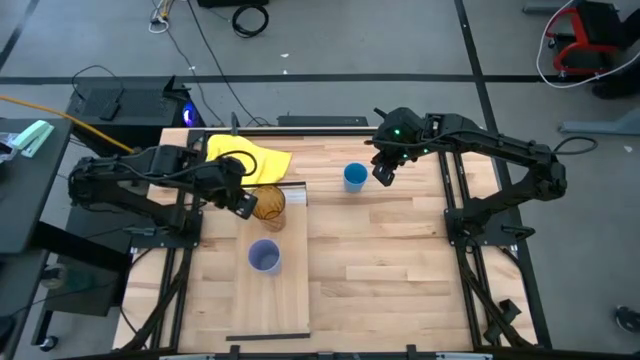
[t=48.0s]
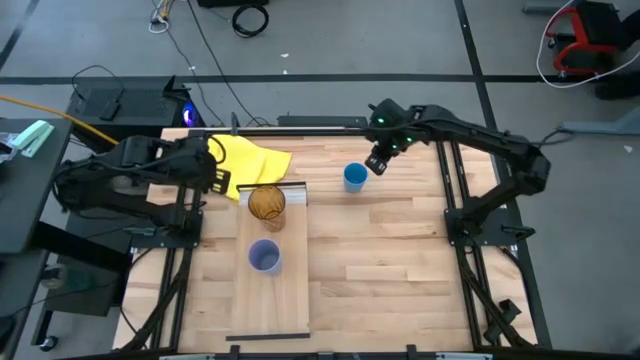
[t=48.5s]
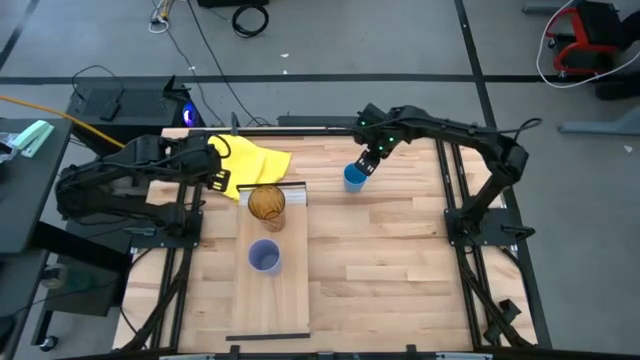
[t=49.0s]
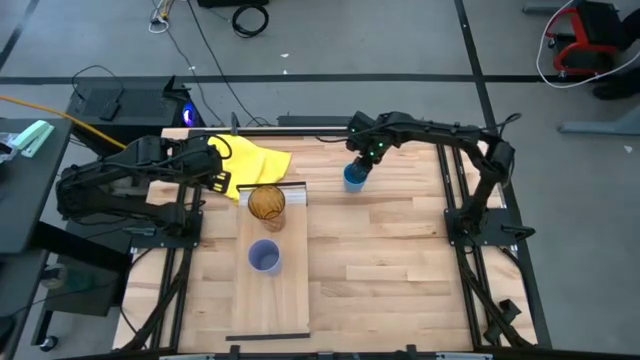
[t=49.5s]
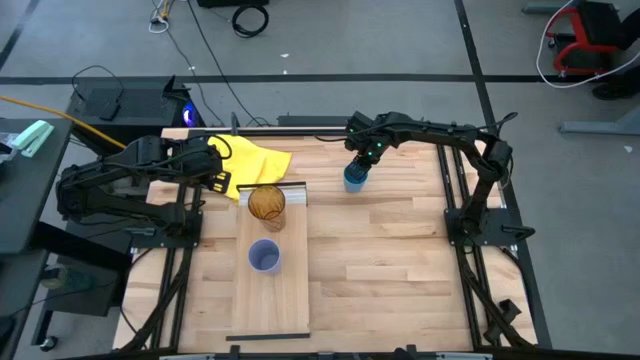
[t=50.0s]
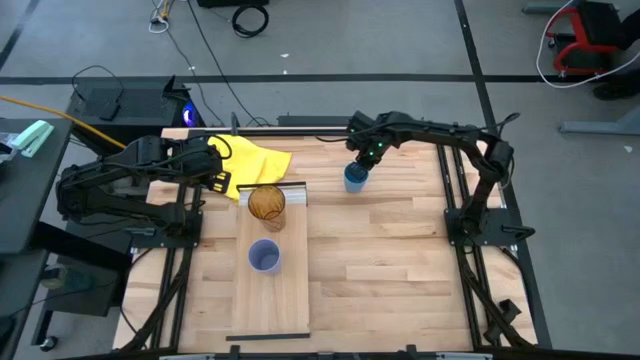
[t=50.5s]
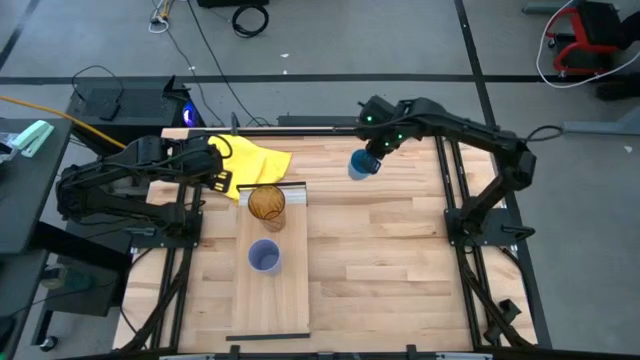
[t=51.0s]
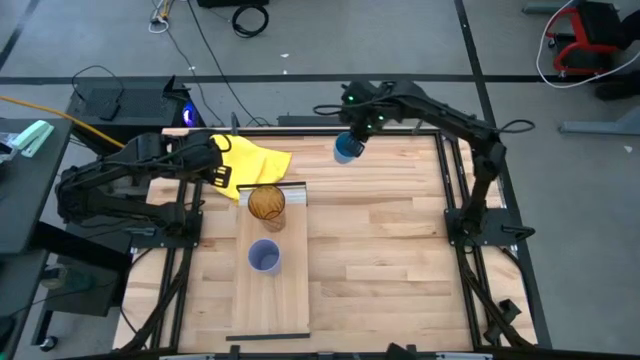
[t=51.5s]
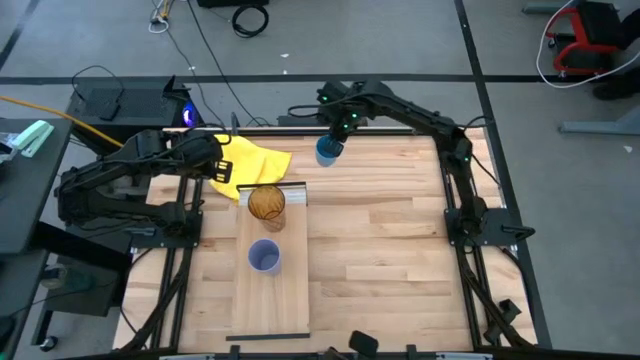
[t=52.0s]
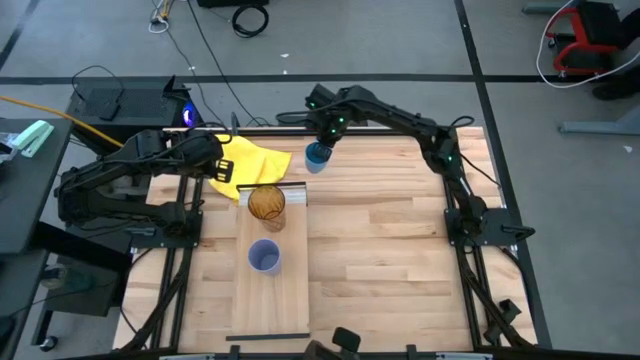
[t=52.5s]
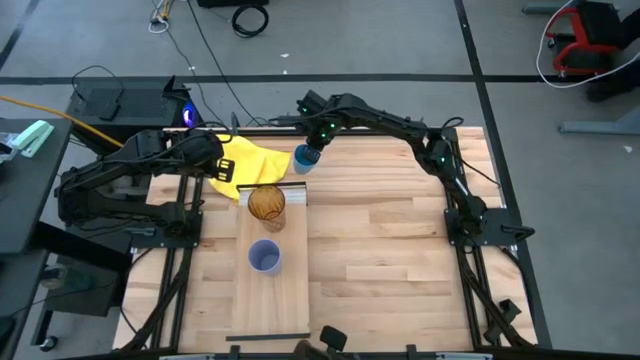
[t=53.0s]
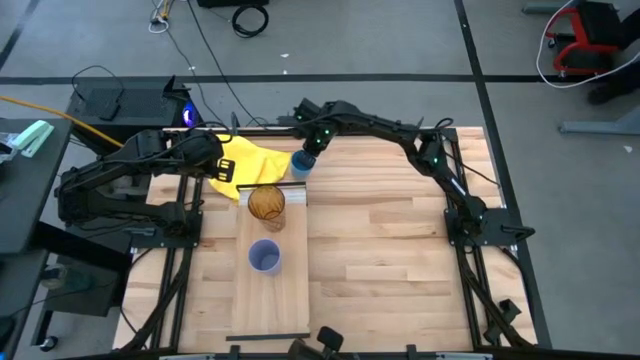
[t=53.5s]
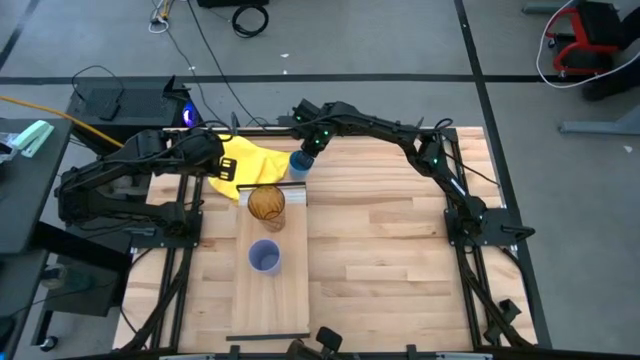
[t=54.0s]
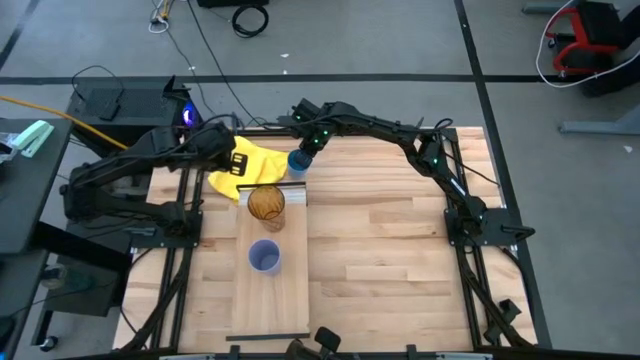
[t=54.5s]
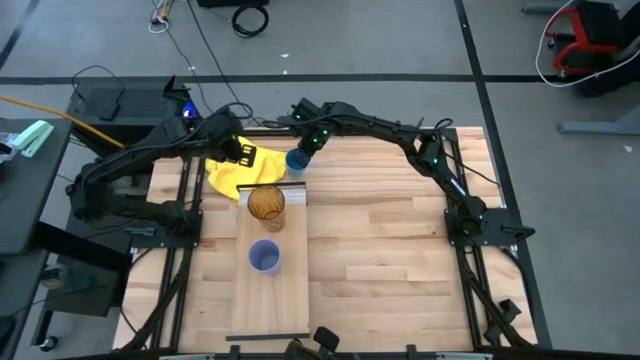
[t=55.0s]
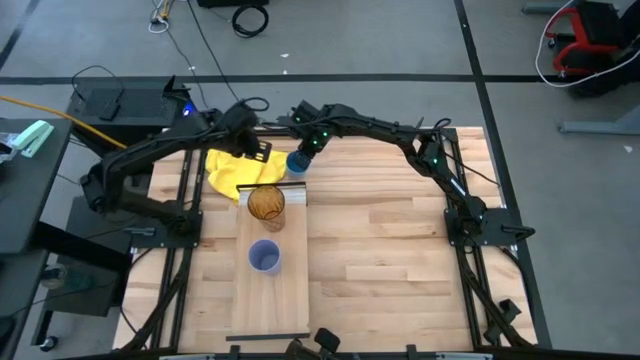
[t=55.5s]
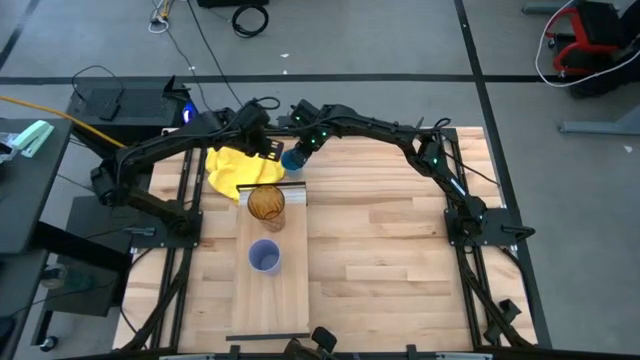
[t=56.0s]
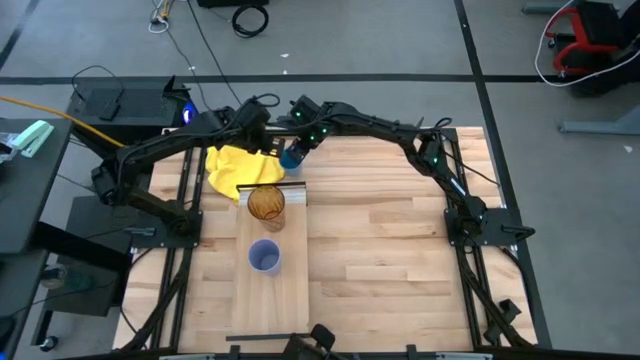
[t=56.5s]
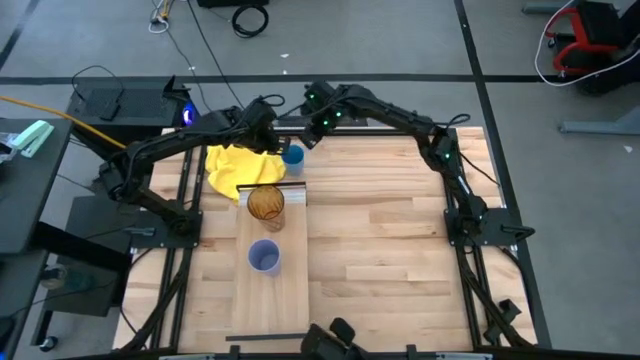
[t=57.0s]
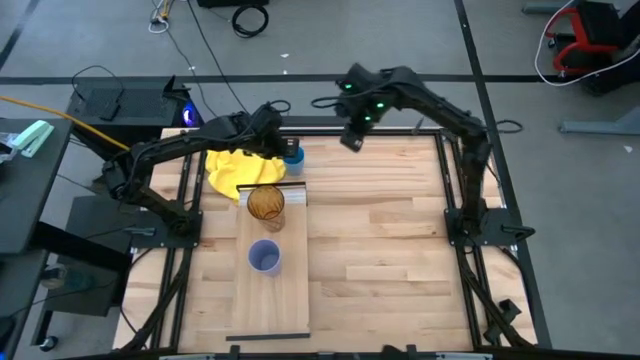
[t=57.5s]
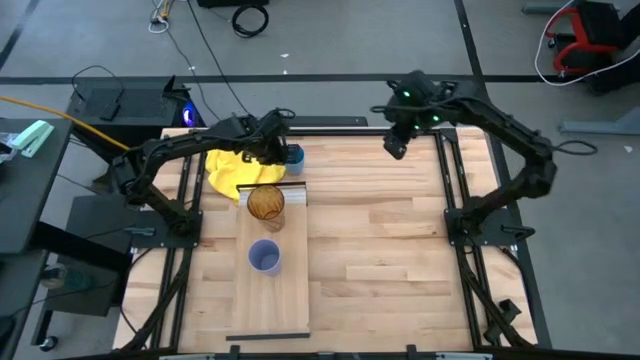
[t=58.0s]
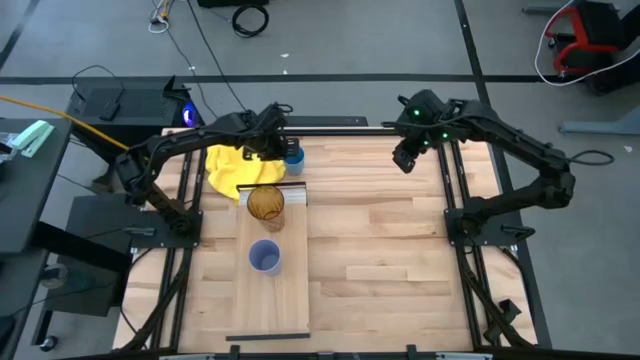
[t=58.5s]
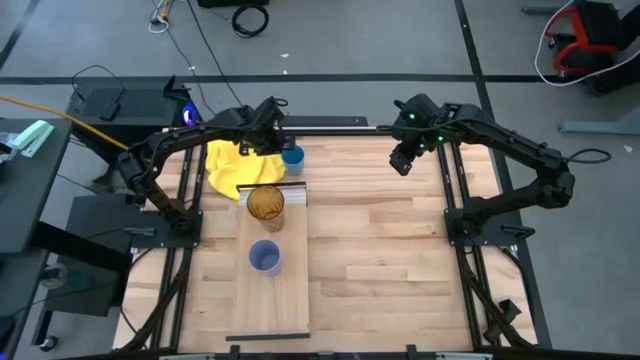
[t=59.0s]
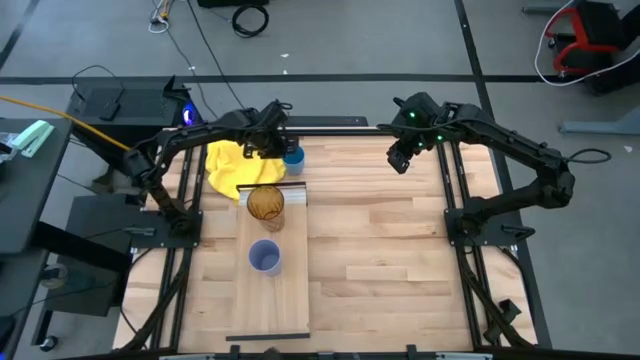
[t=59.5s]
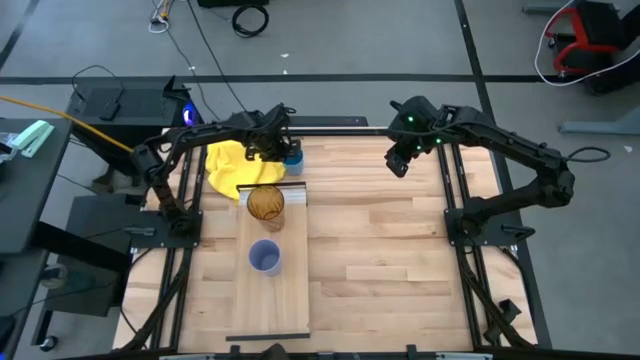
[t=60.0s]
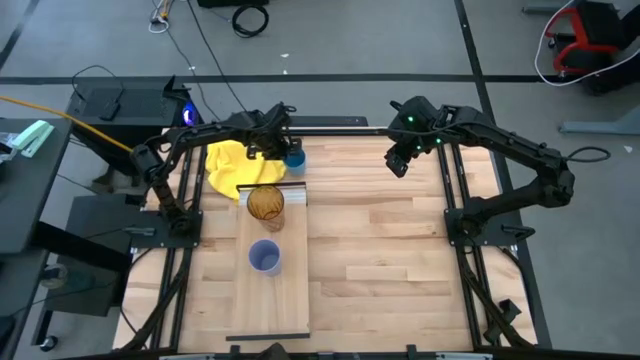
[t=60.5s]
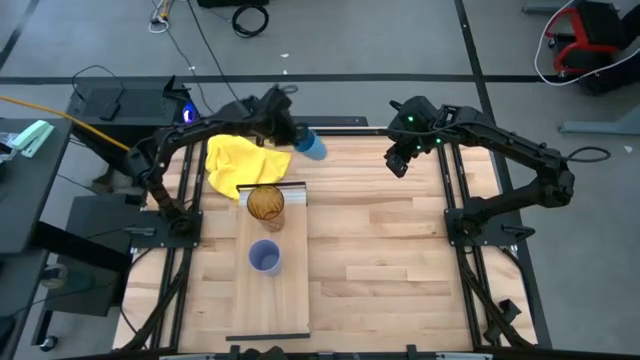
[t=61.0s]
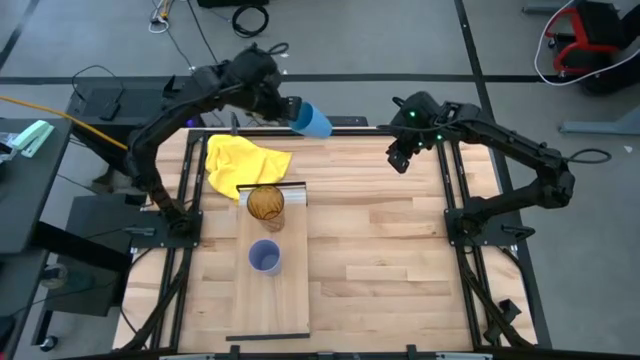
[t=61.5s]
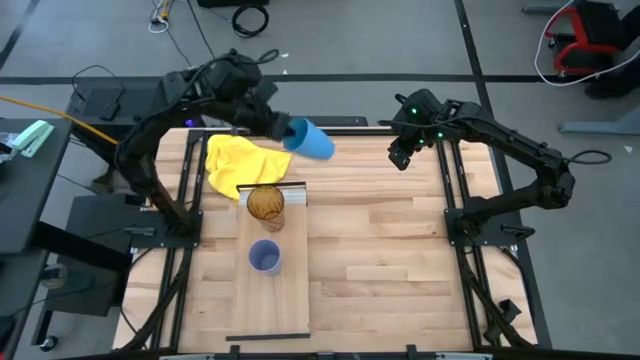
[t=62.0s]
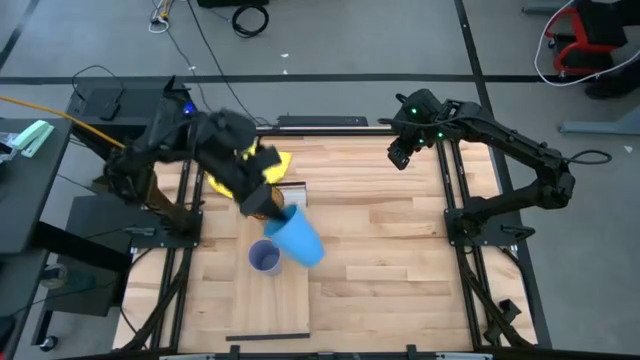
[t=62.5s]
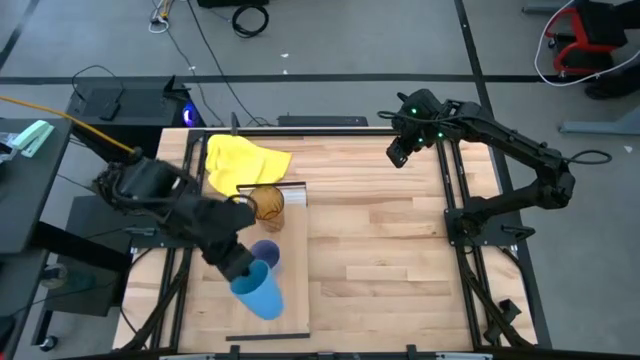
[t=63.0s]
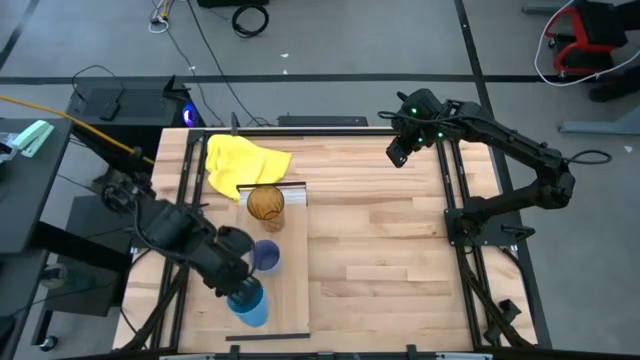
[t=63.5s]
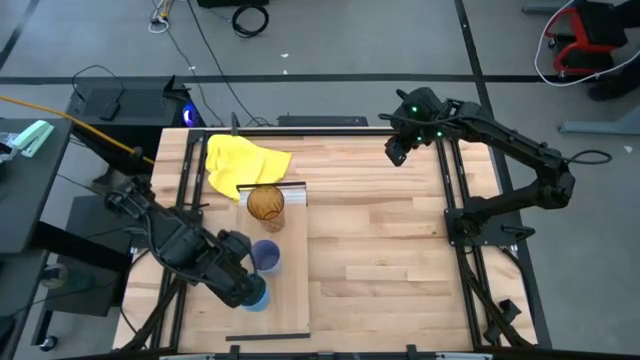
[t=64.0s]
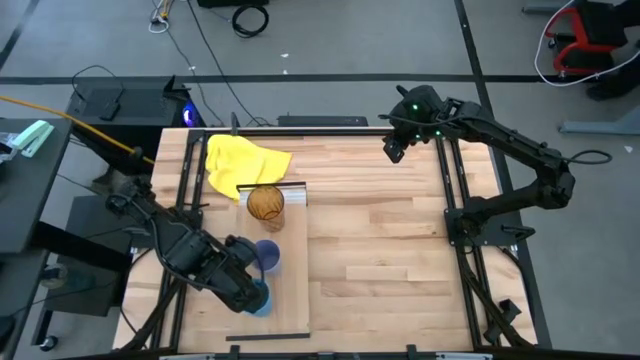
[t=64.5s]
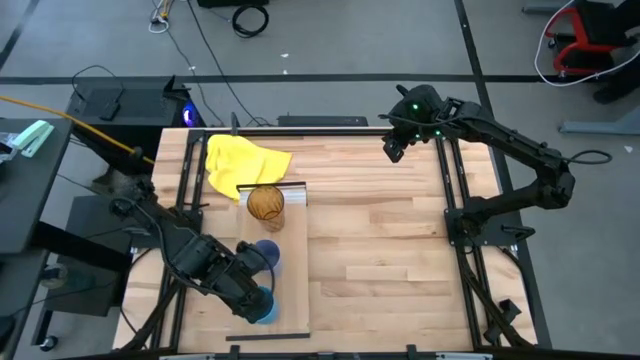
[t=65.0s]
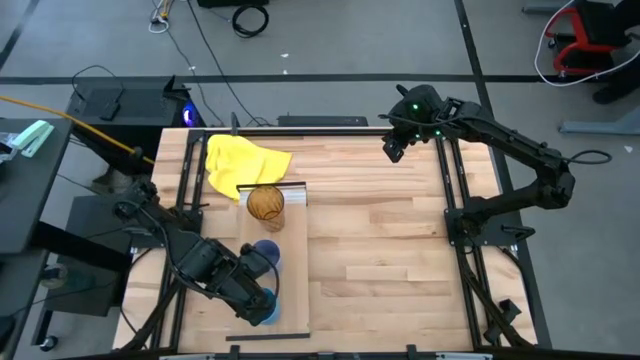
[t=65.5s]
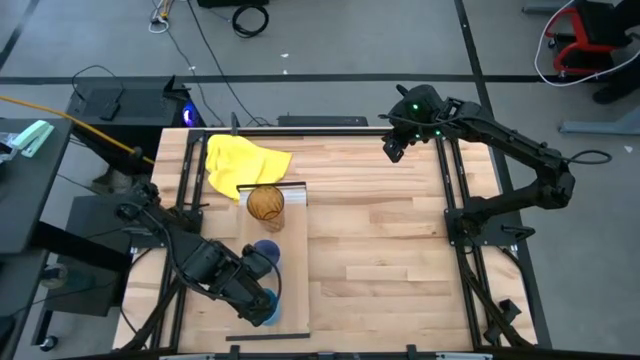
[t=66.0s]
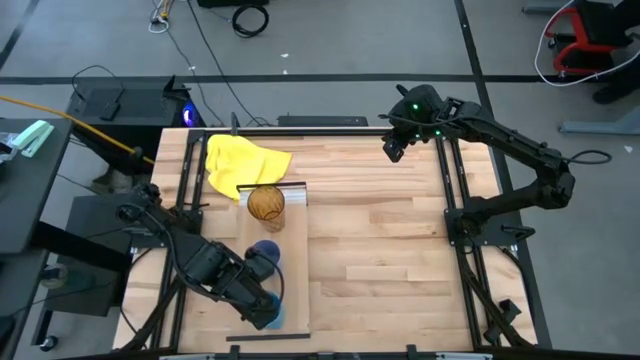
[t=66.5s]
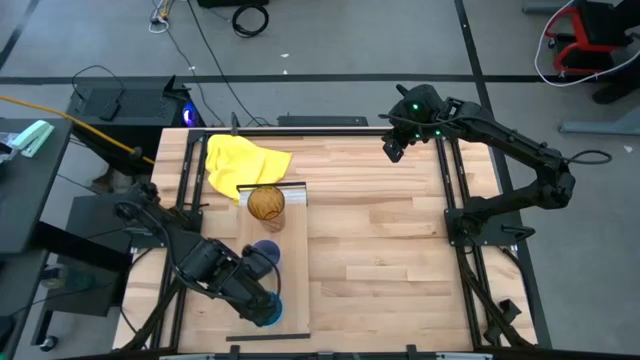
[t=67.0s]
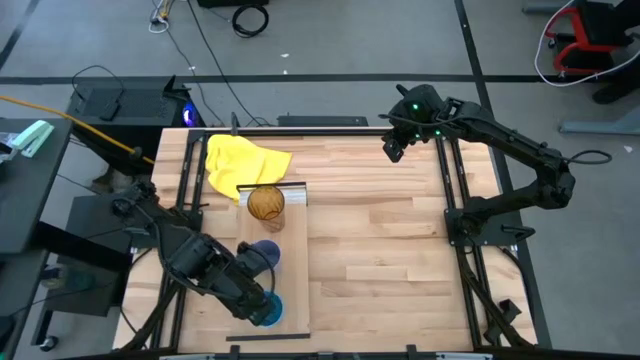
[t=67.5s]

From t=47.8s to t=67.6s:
Task: Stack small to large cups/mugs on shelf
Put the blue cup on the shelf
